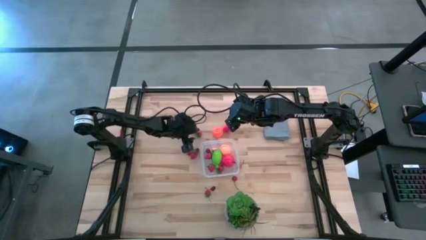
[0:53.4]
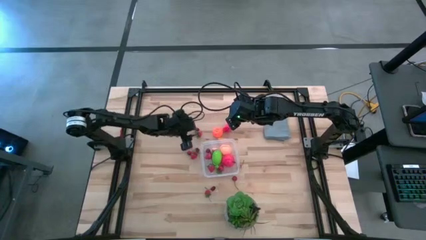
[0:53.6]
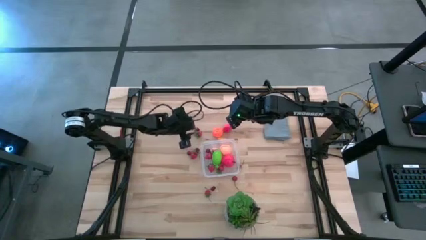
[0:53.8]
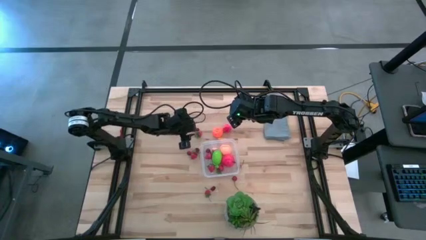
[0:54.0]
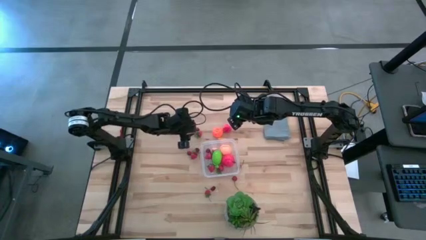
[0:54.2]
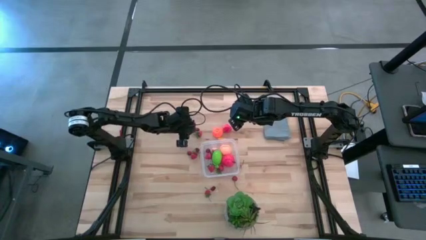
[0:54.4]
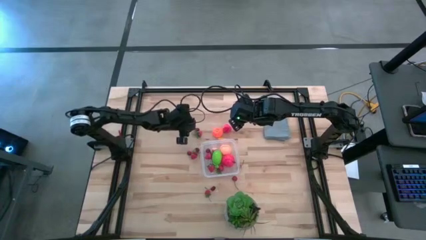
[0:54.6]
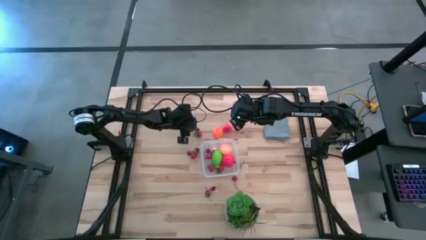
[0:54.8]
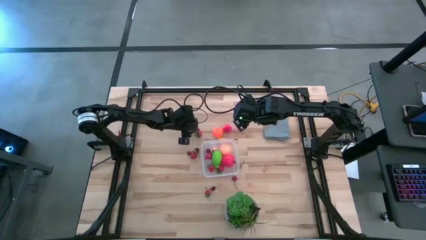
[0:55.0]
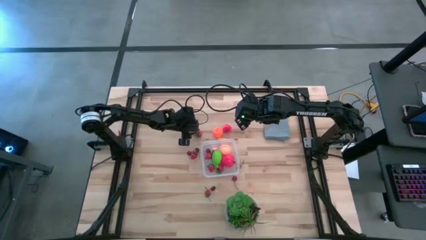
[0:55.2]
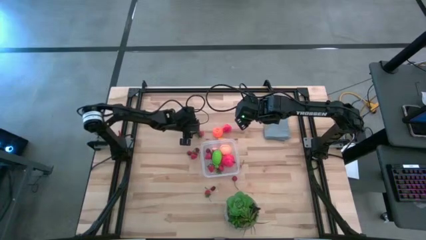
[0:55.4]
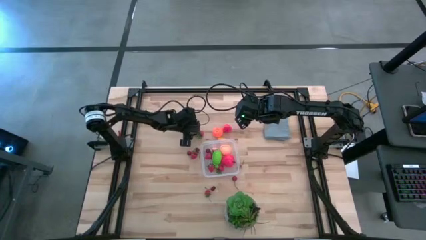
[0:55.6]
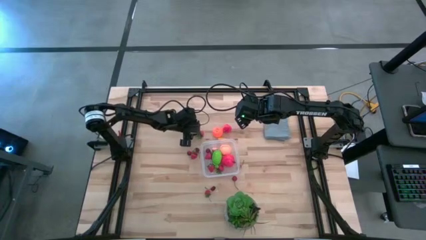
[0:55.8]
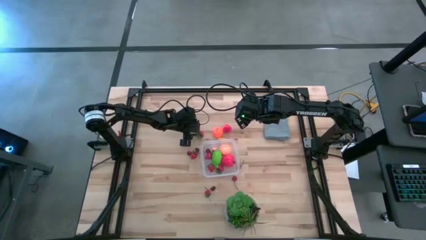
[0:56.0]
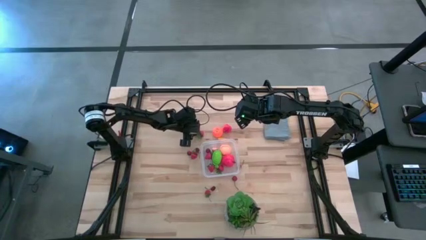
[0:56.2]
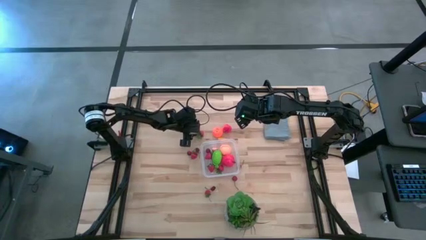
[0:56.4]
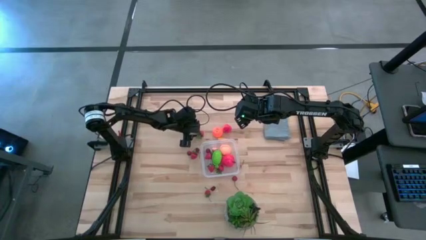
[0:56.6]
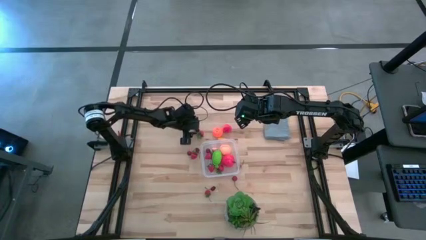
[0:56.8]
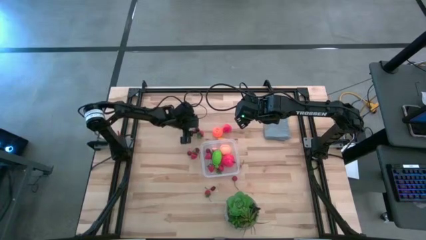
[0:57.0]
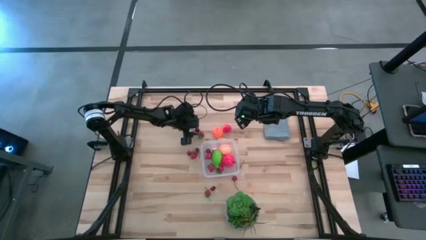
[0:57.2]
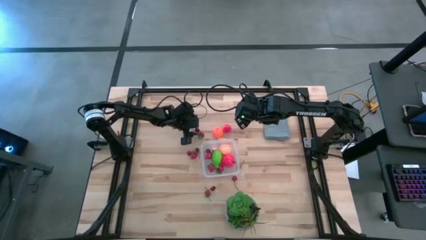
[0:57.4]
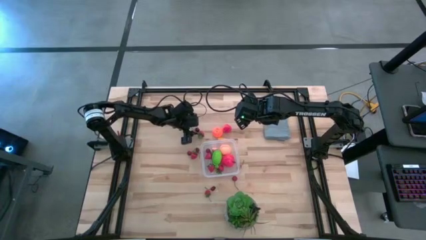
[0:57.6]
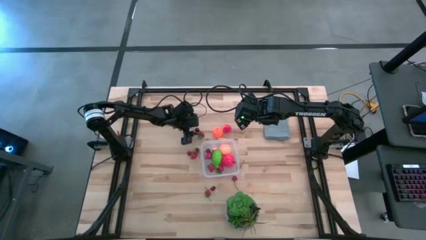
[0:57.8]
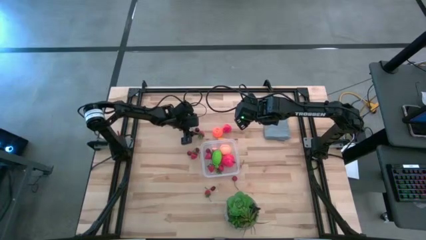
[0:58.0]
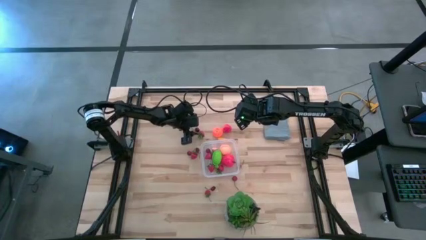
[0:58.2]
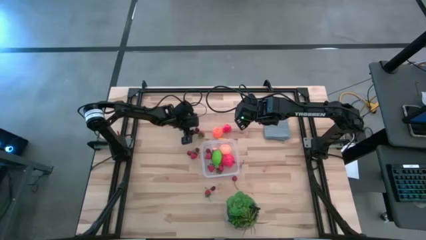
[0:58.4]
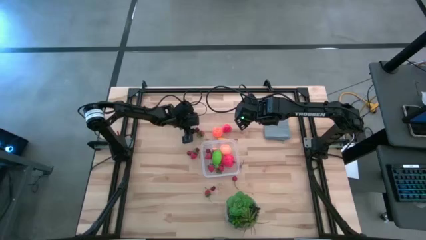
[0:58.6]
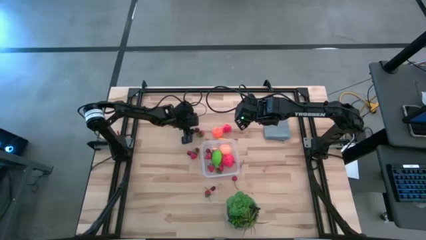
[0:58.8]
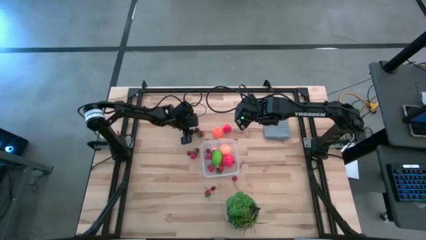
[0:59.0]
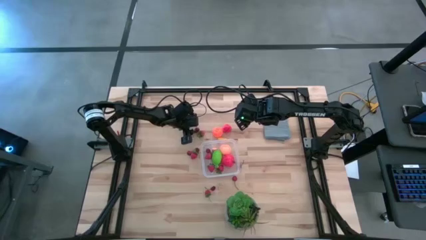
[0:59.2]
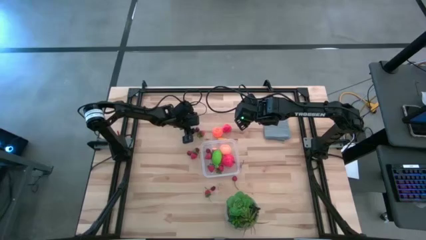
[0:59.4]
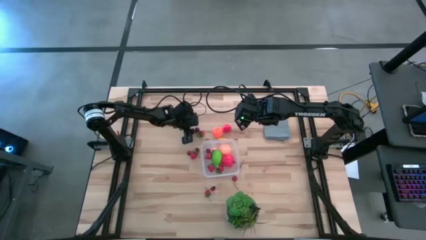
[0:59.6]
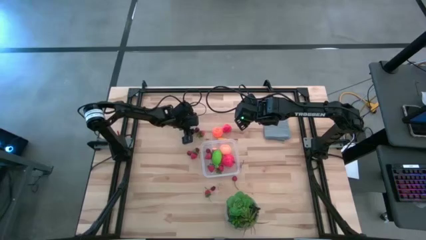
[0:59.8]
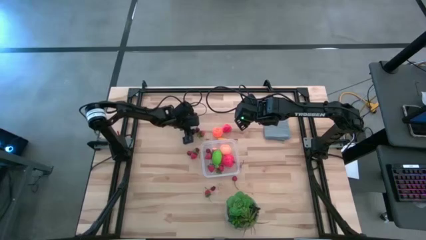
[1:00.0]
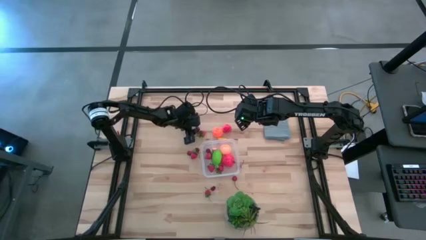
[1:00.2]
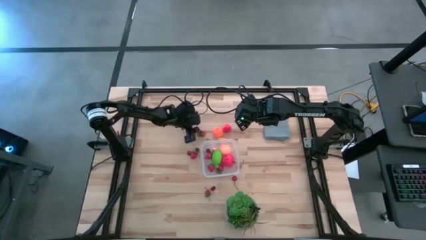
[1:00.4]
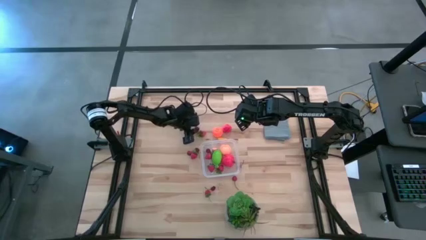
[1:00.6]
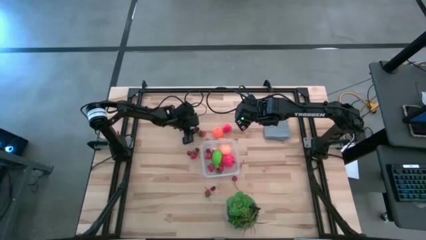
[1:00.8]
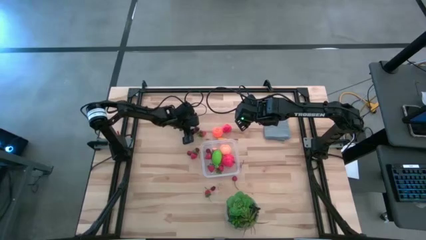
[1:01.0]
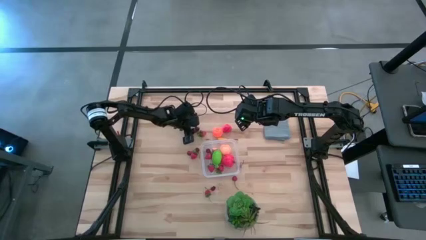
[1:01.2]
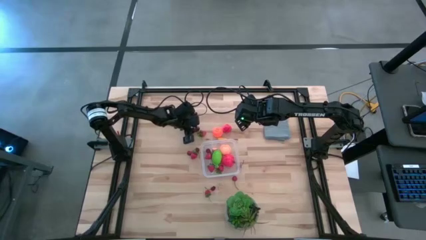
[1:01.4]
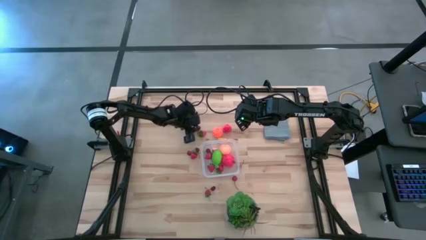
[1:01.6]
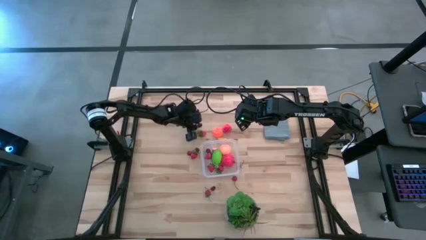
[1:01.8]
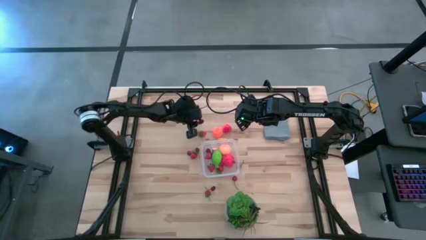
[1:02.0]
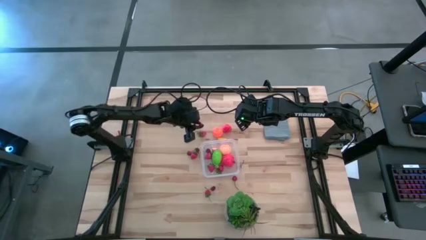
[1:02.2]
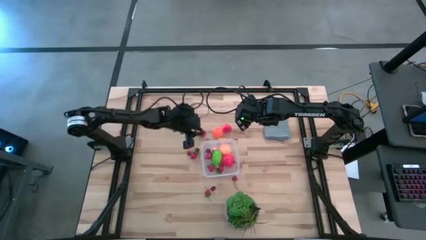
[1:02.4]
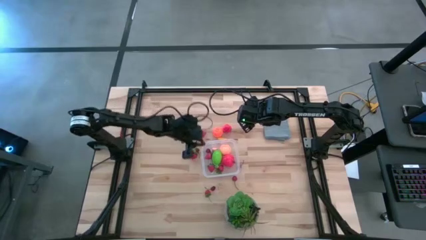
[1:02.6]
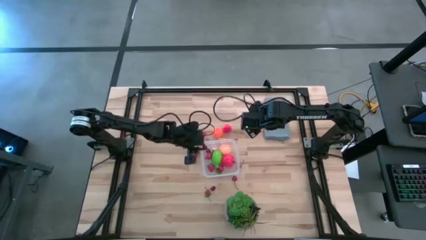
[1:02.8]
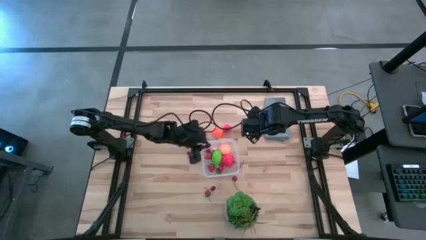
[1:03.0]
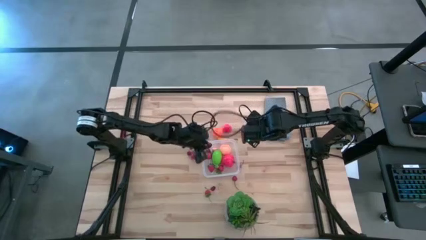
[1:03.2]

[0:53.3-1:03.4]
Task: Pick and placing Produce into tupperware
Put the red cherry into the transparent container

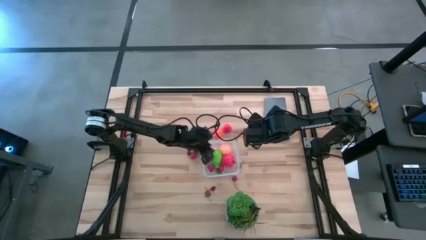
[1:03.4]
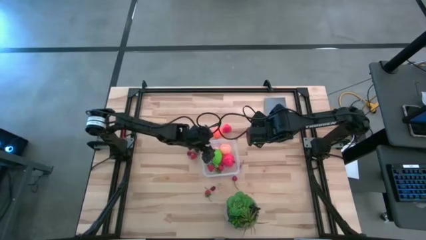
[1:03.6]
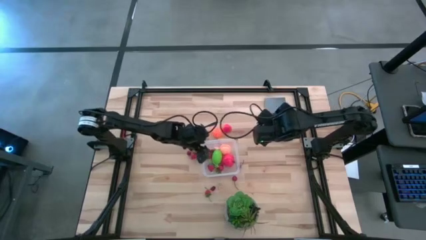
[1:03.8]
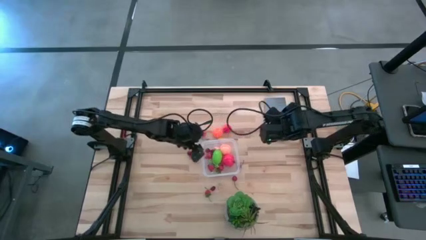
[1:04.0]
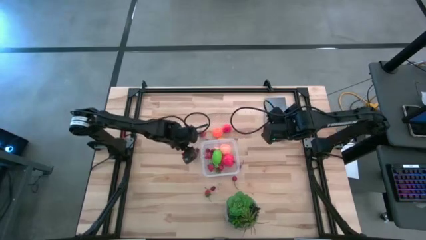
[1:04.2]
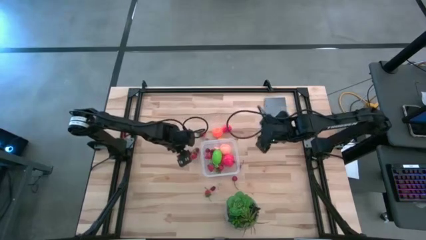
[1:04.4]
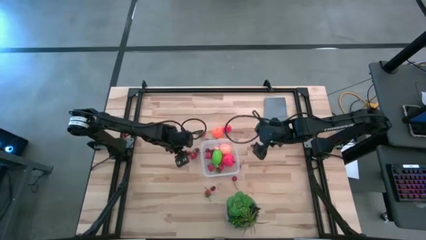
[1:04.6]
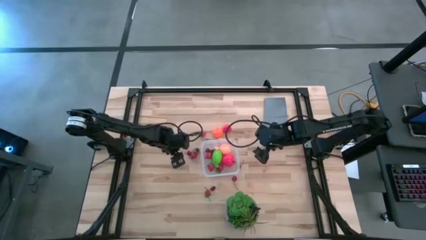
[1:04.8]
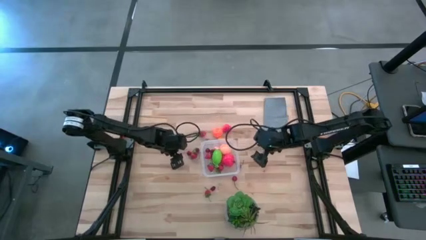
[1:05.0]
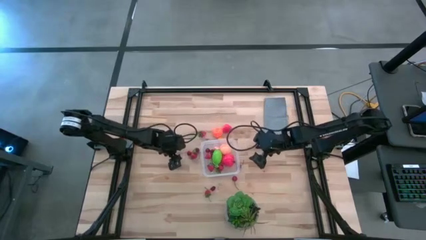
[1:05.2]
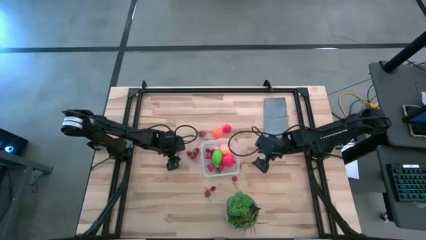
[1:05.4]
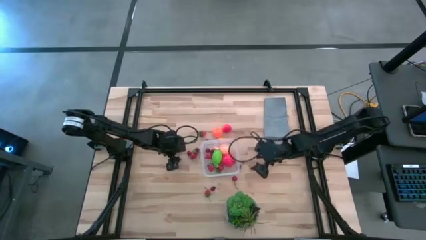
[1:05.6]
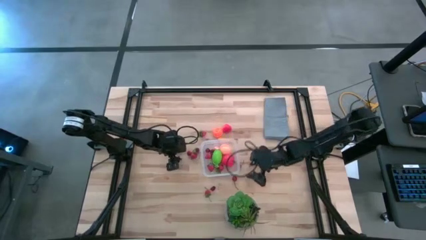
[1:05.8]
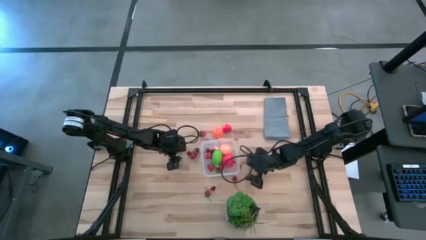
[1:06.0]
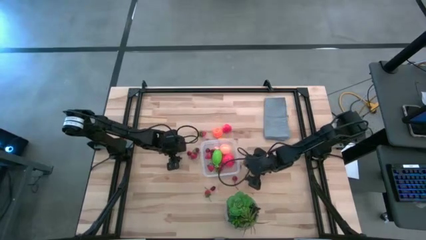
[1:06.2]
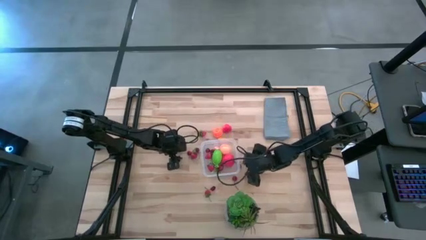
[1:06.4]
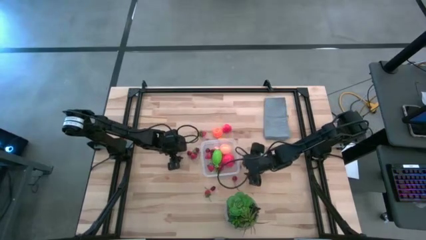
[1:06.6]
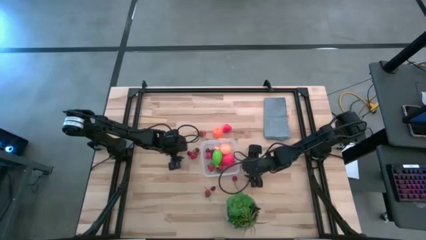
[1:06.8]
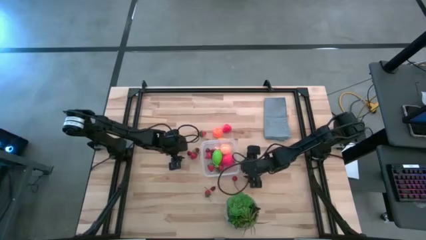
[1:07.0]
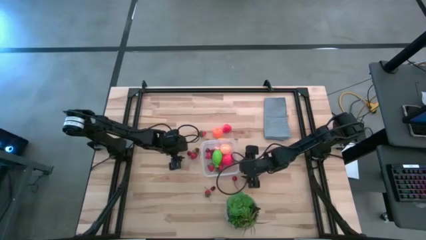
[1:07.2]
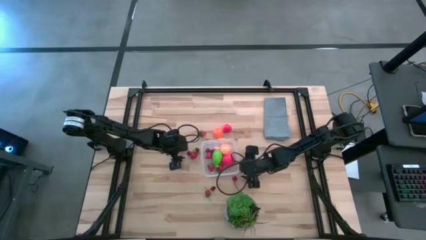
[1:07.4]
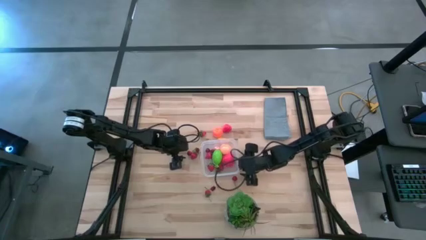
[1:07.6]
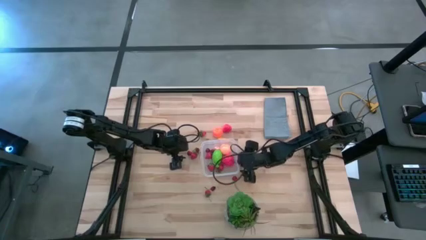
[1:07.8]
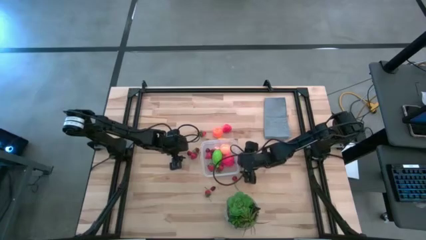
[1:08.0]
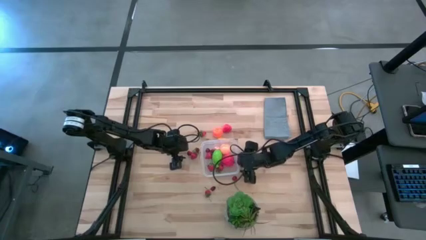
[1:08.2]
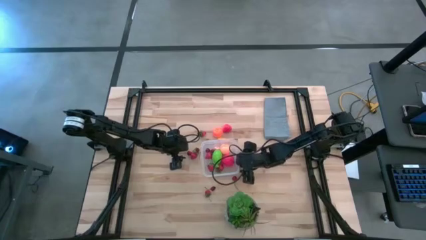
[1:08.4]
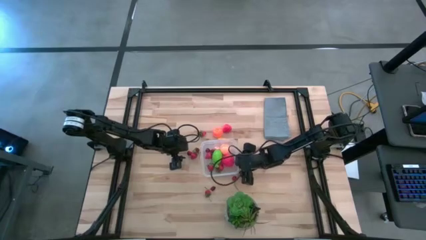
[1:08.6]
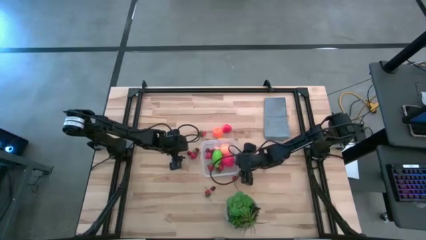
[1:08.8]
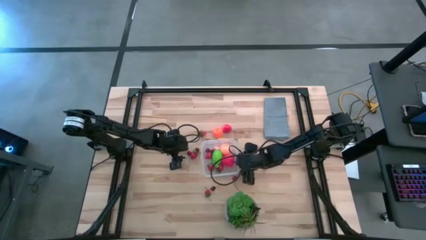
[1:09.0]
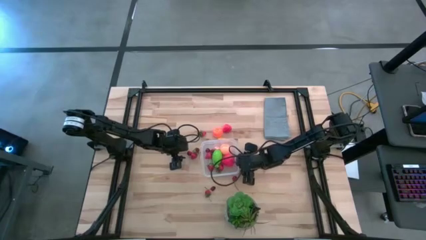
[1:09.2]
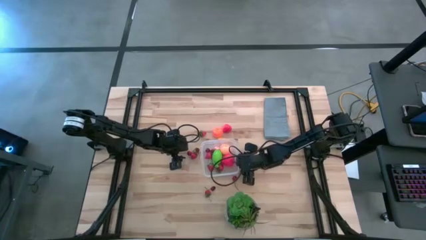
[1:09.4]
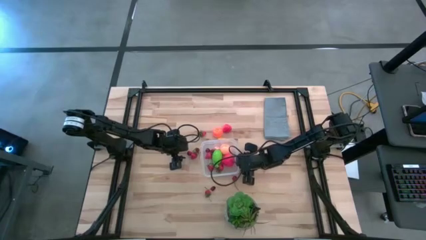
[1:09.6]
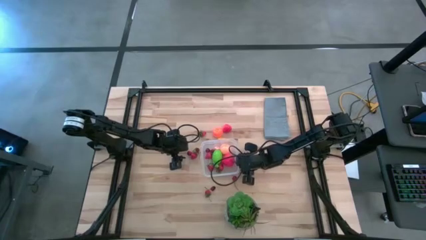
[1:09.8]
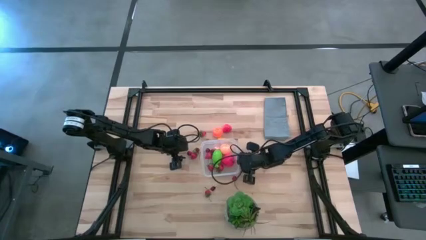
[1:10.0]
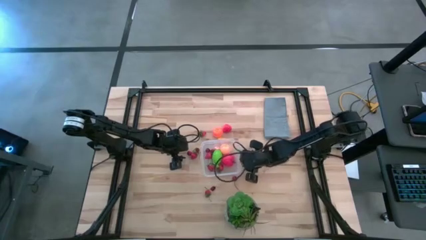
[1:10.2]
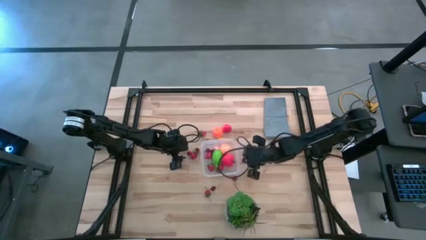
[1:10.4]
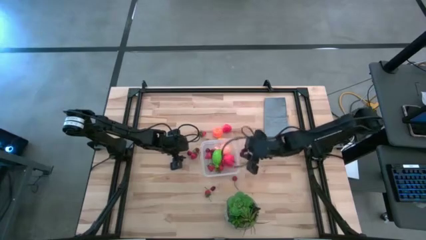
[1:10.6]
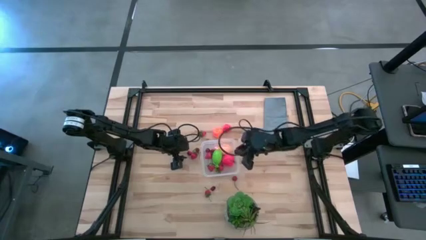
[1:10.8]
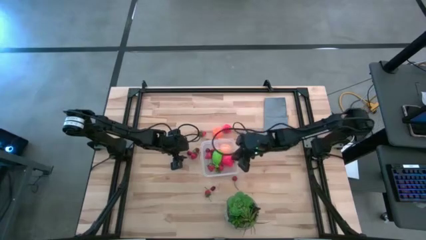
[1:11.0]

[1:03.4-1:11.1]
Put the red cherry into the transparent container
